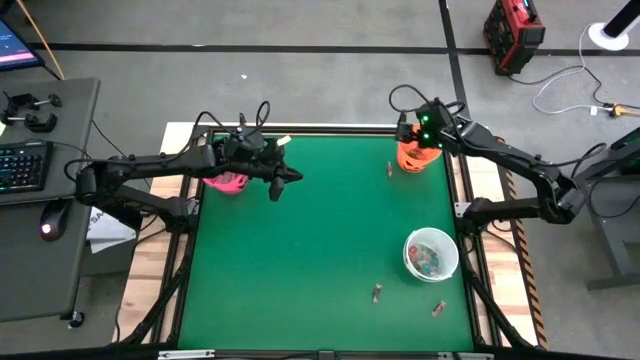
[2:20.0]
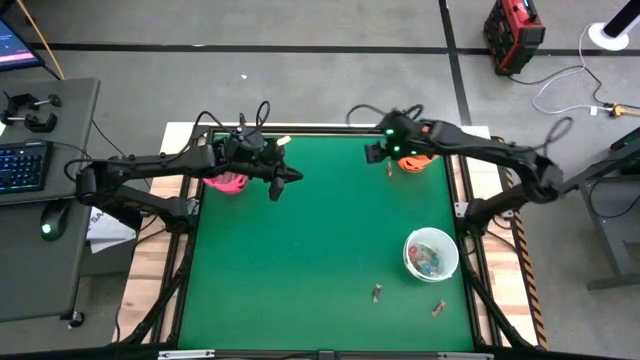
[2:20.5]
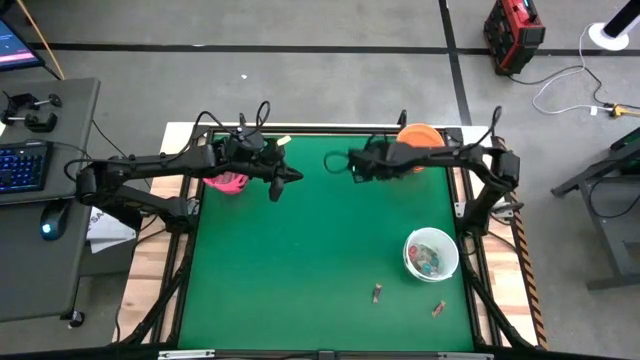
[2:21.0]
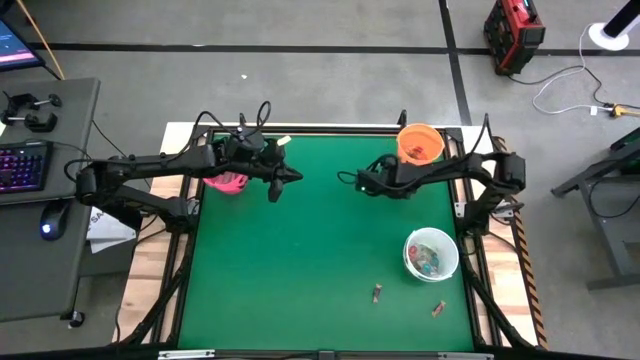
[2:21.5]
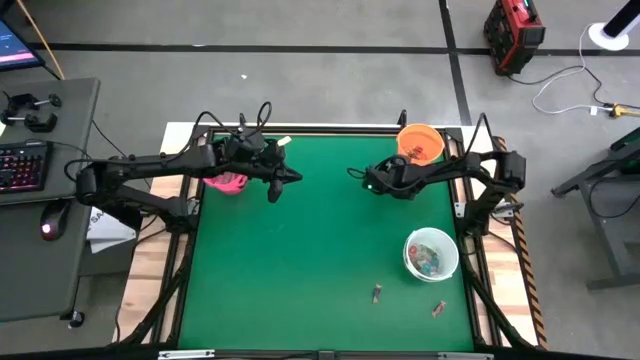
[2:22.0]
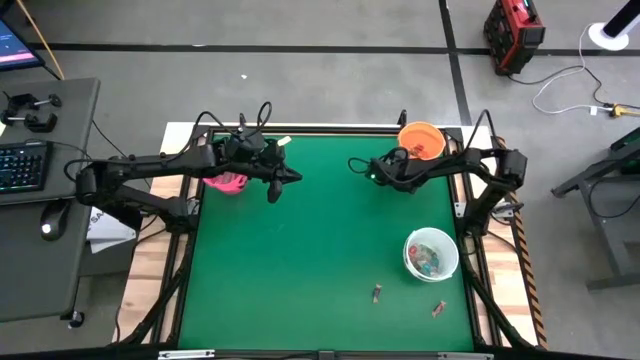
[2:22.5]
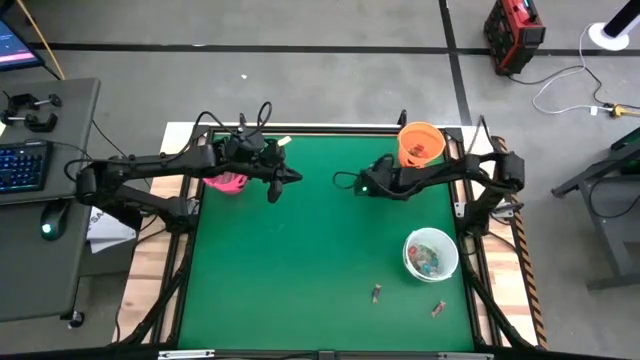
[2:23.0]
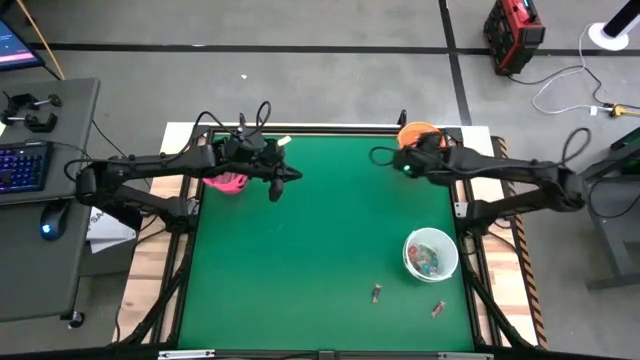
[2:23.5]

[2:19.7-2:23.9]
Task: Sort candy by brand, put in halloween buckets
Put the pink candy into the orange bucket

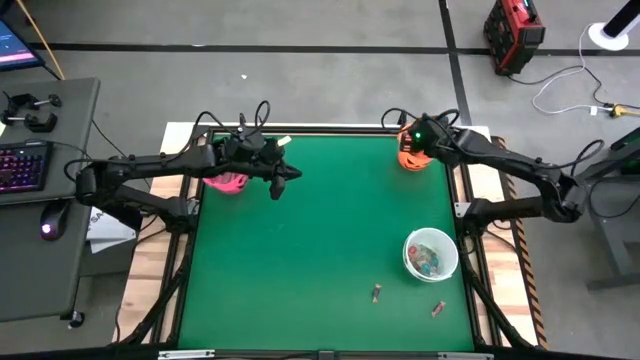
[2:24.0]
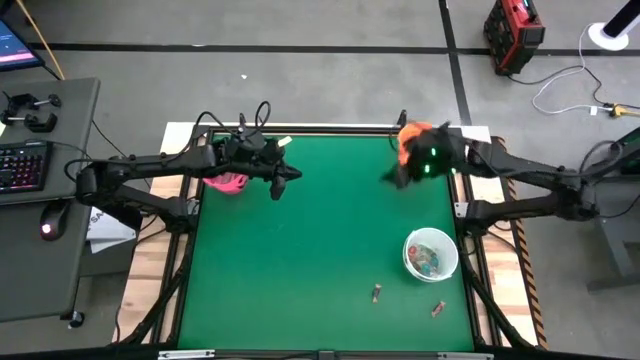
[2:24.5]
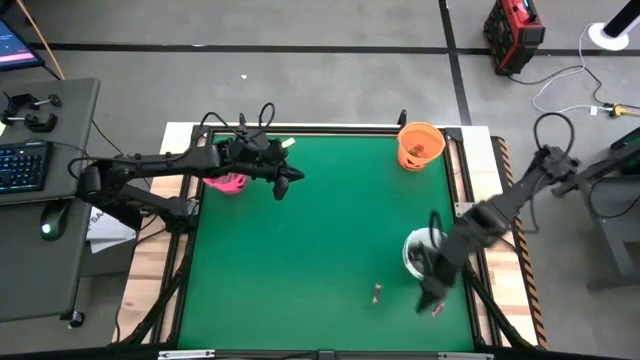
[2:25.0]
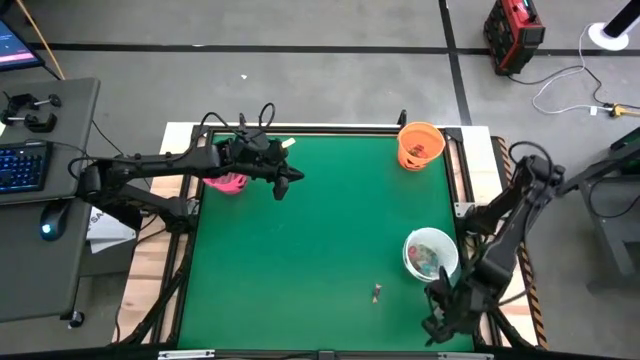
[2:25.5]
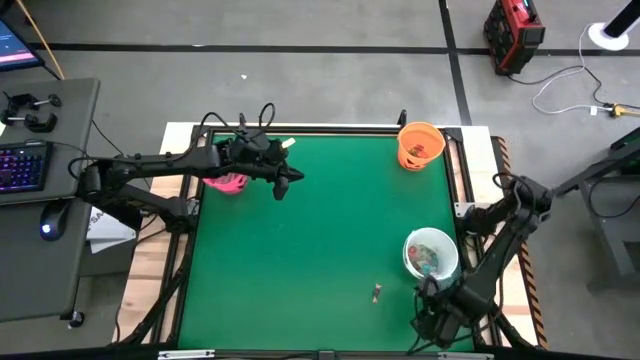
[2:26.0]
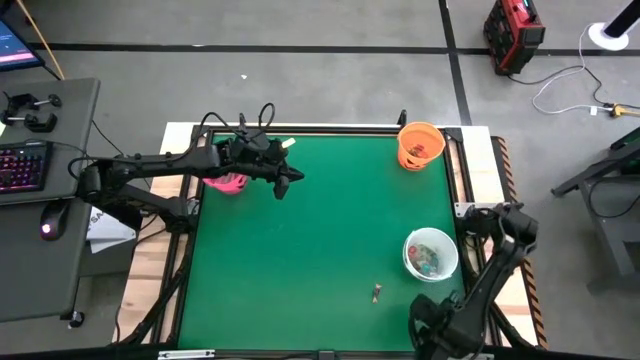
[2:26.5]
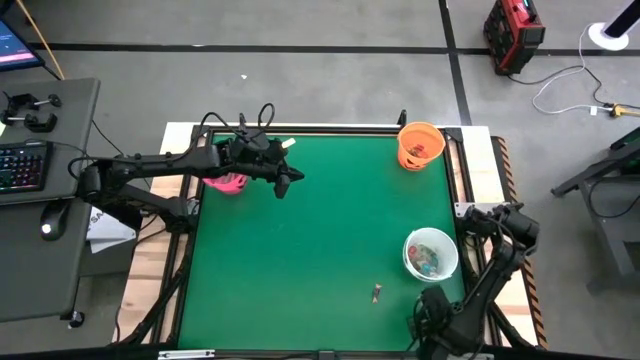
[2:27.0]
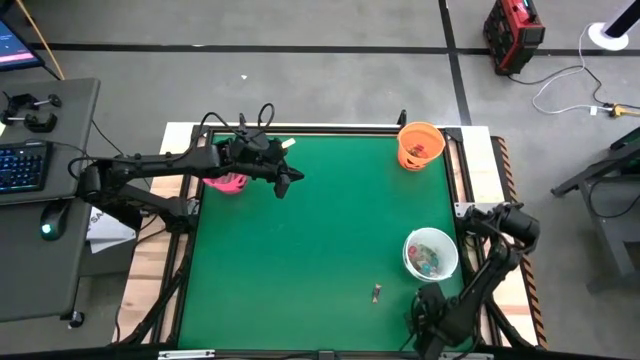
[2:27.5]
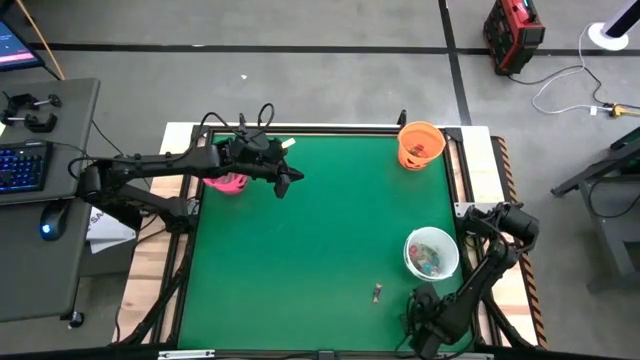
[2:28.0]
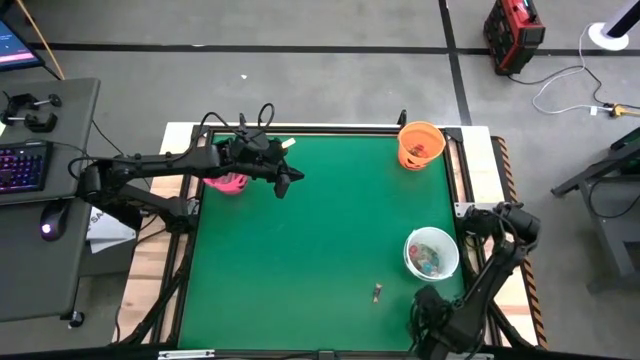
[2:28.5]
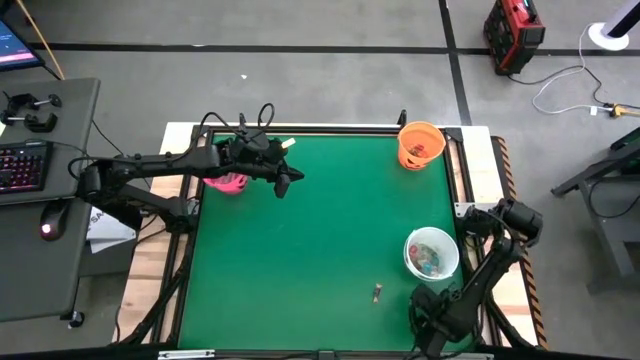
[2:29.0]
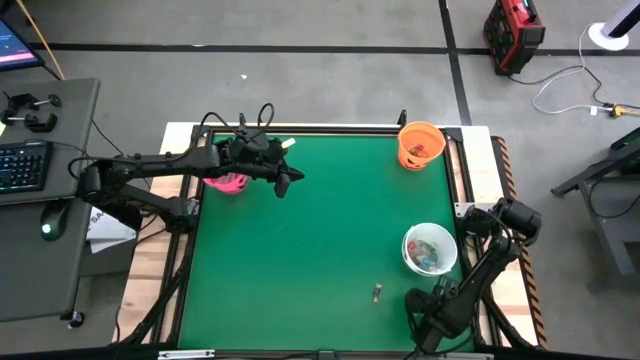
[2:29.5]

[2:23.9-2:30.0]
Put the pink candy into the orange bucket

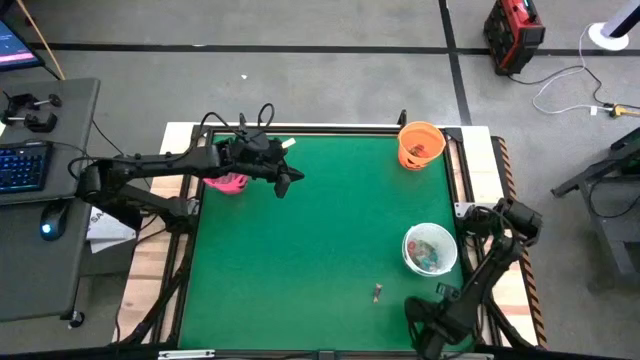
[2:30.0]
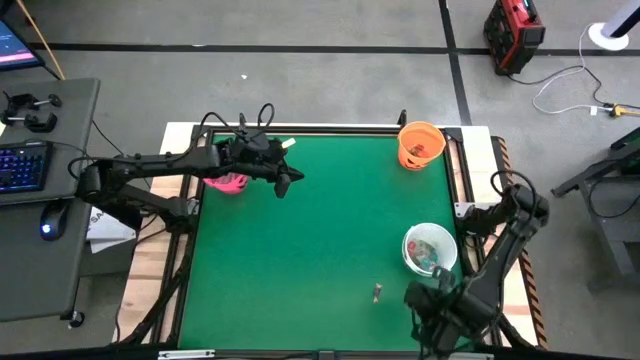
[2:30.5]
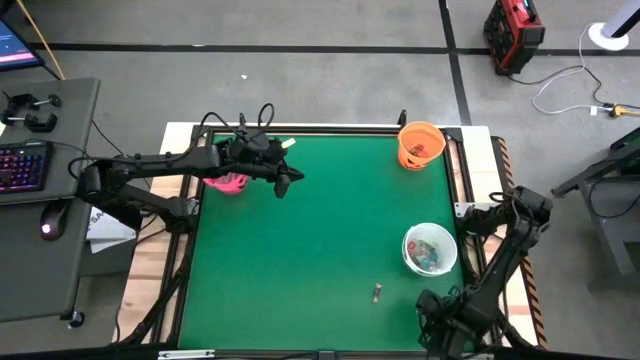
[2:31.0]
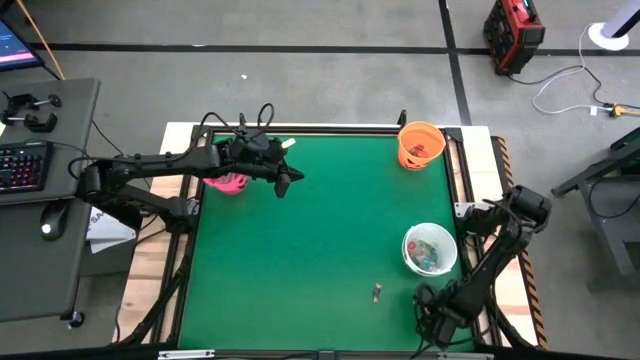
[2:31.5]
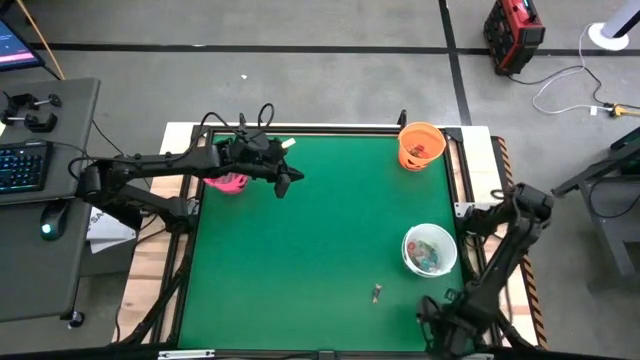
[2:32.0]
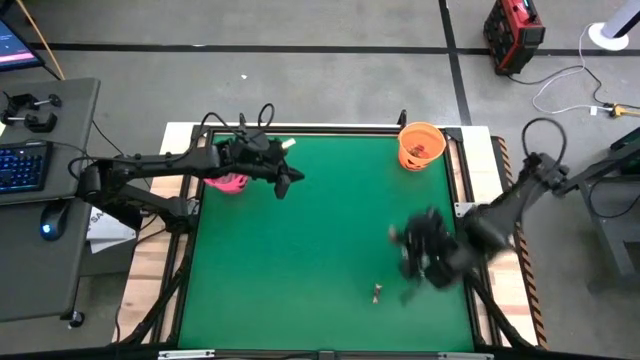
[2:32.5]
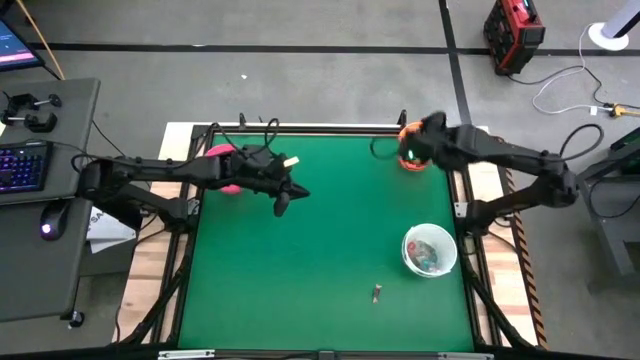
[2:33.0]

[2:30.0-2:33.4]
Put the pink candy into the orange bucket

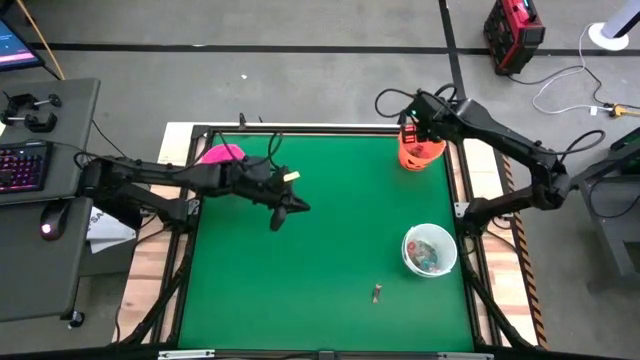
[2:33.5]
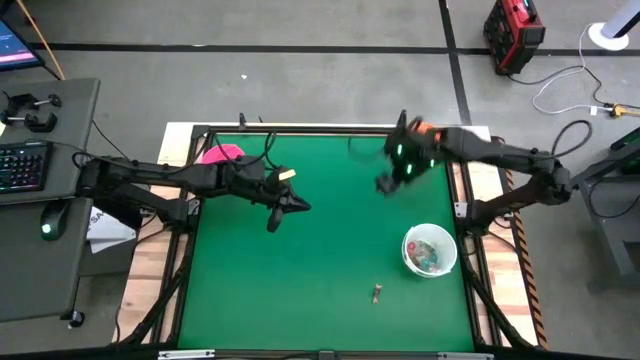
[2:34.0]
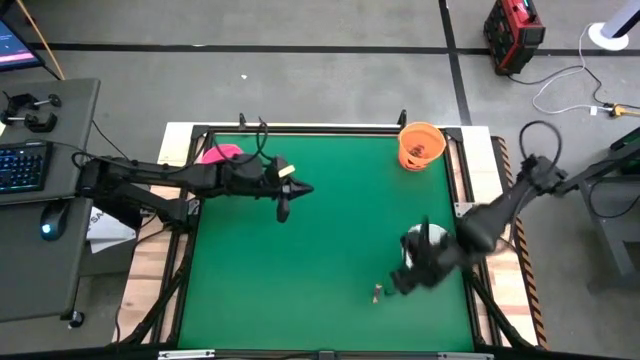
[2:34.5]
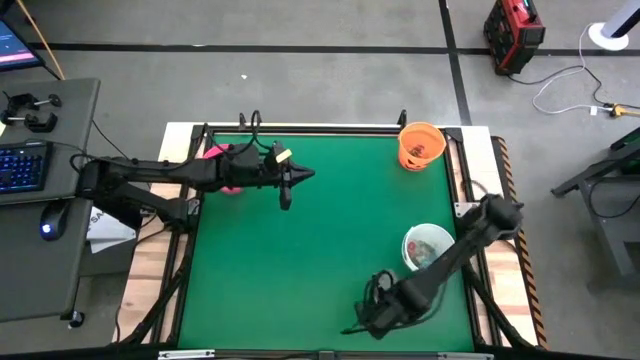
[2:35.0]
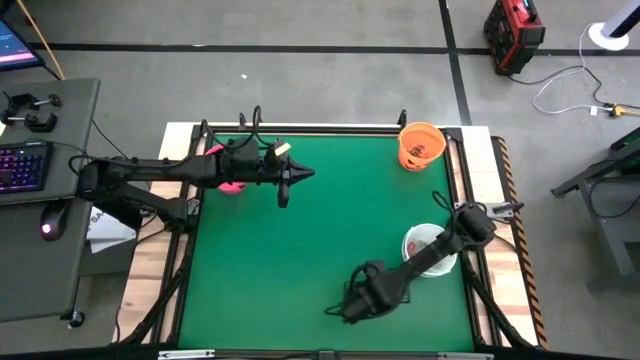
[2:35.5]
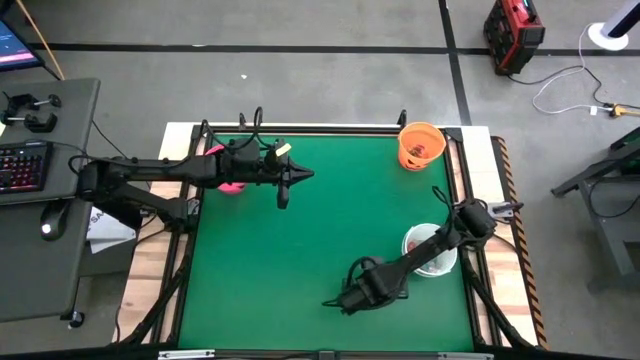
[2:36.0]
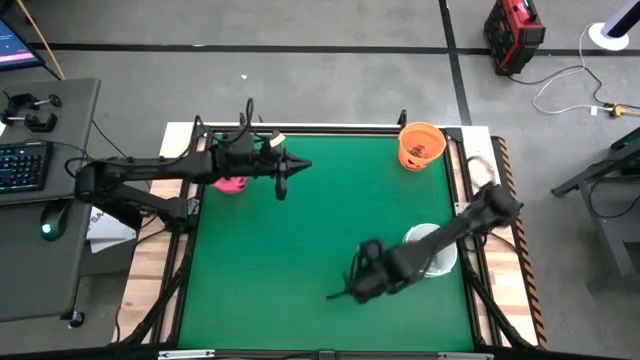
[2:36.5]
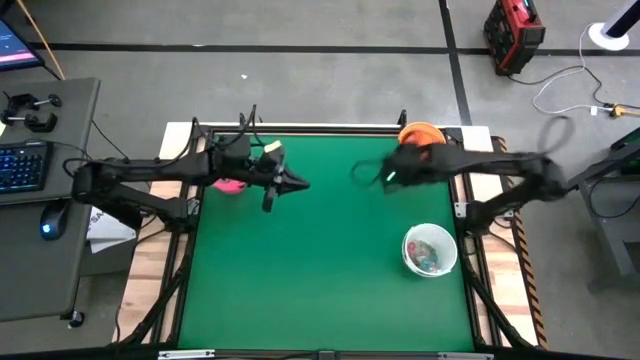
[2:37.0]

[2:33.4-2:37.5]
Put the violet candy into the orange bucket

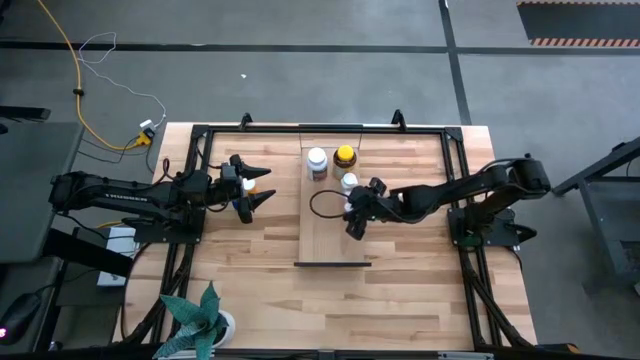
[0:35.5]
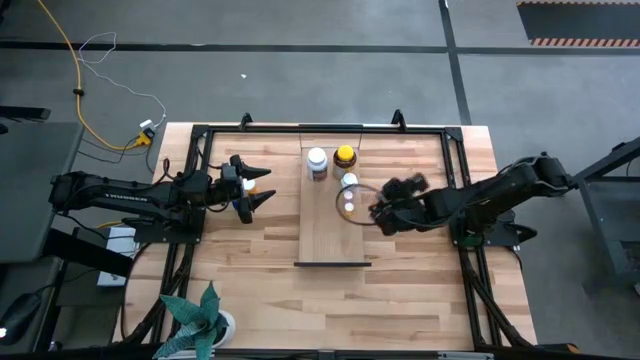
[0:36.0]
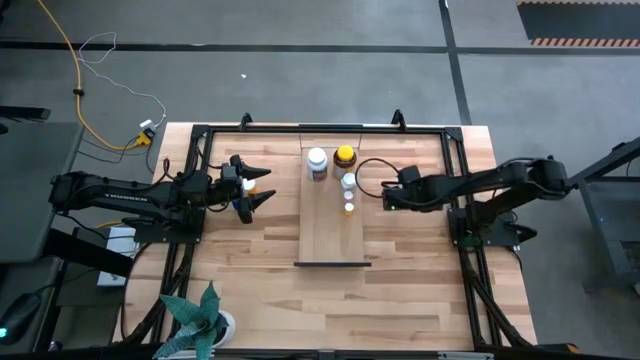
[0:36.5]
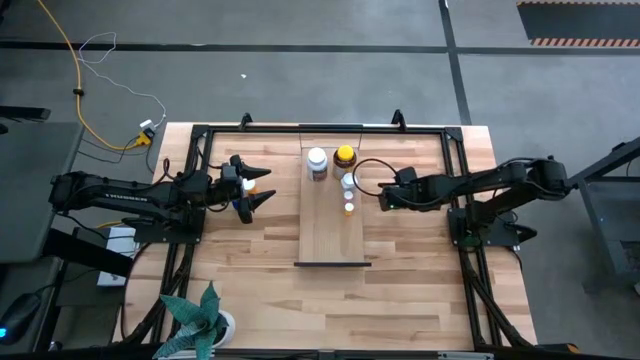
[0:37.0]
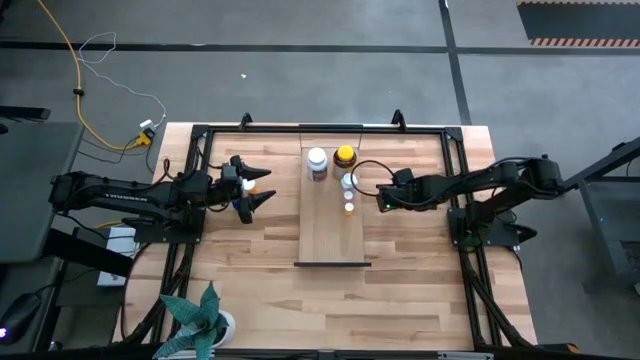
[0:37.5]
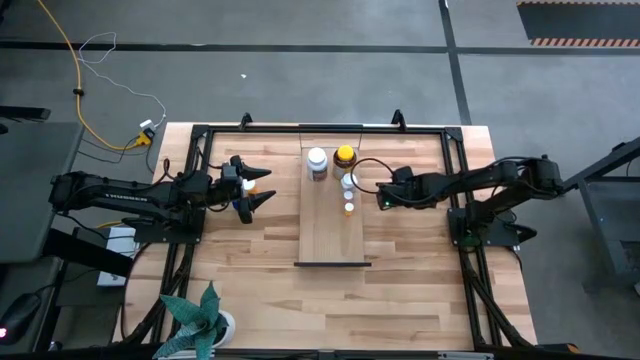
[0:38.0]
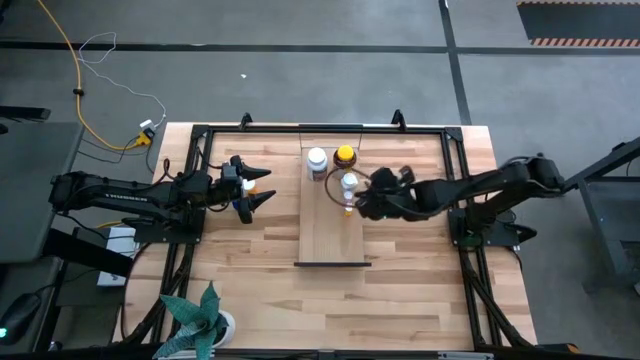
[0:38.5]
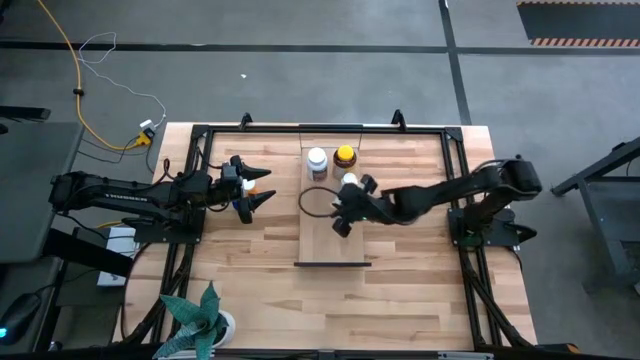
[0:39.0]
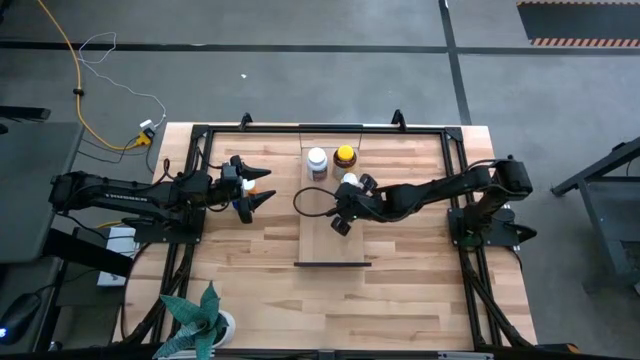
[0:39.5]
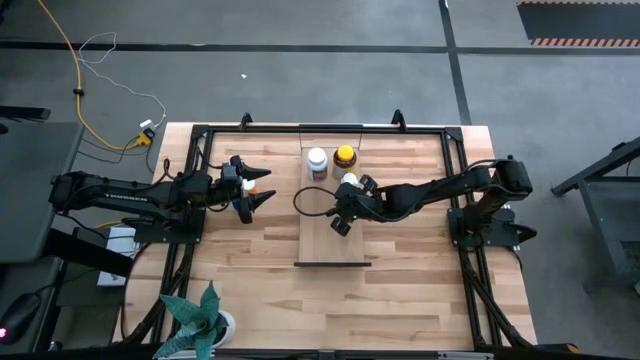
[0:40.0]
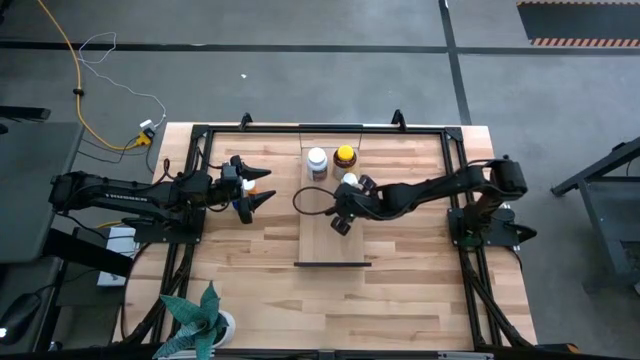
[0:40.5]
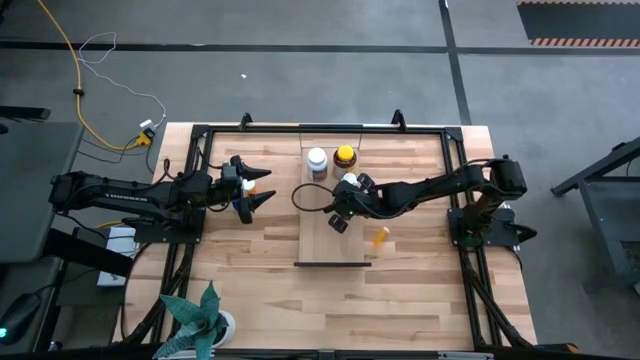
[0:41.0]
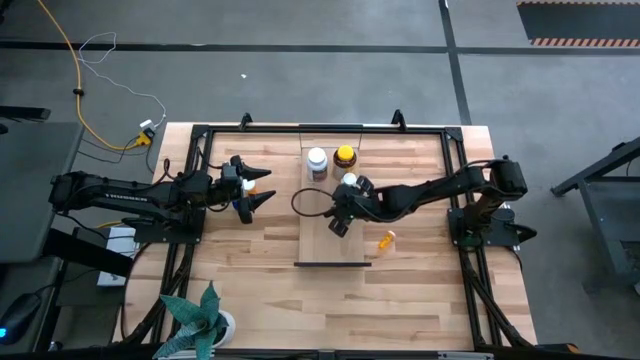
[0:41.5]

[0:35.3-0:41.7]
Task: Pick and place medicine bottles onto shelf by color
Put the yellow pill bottle on the shelf
